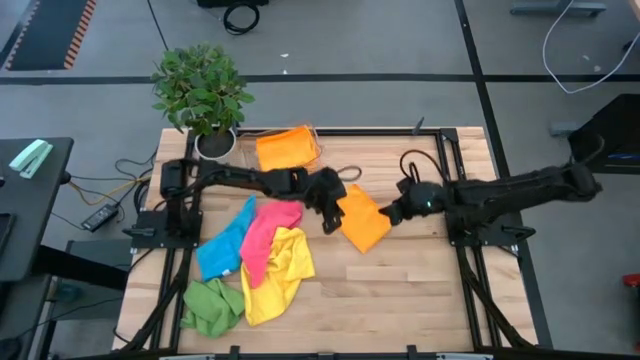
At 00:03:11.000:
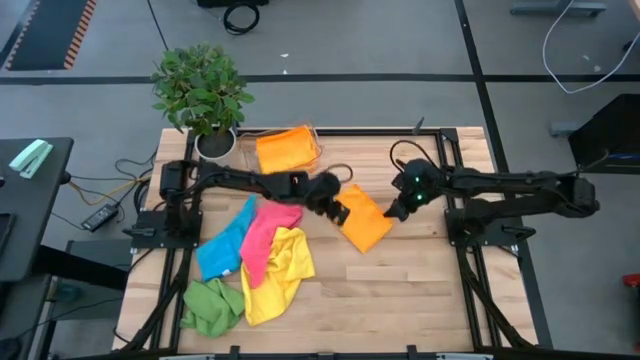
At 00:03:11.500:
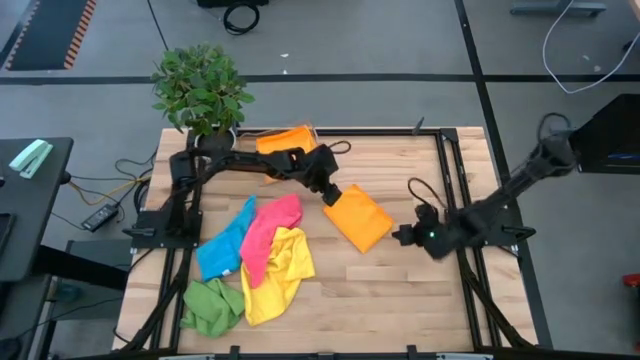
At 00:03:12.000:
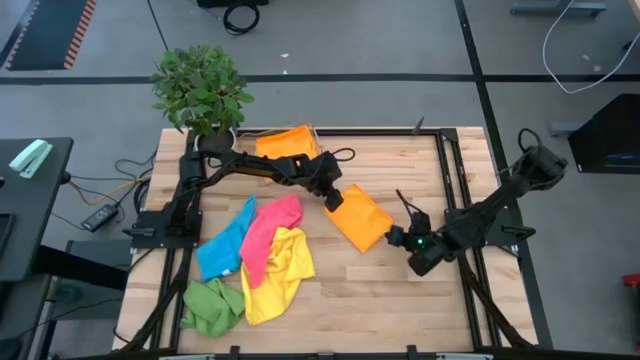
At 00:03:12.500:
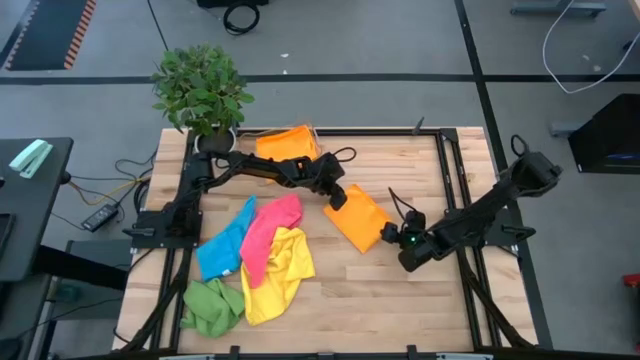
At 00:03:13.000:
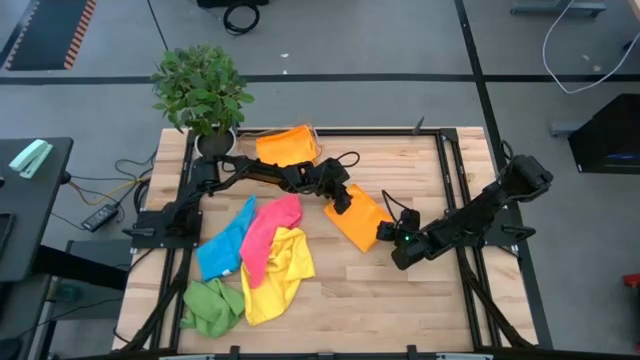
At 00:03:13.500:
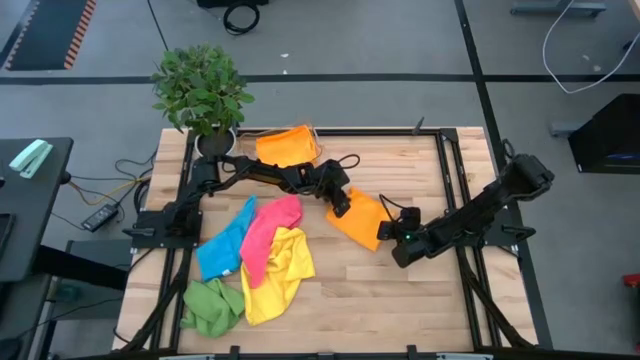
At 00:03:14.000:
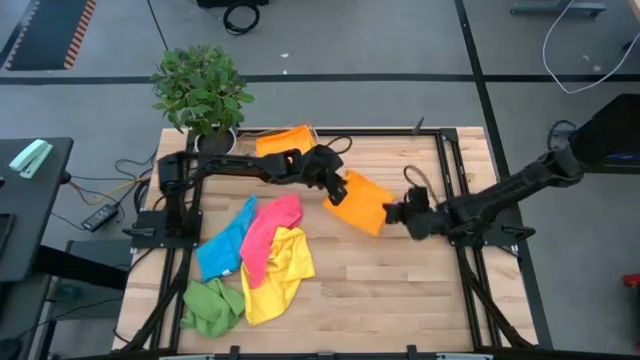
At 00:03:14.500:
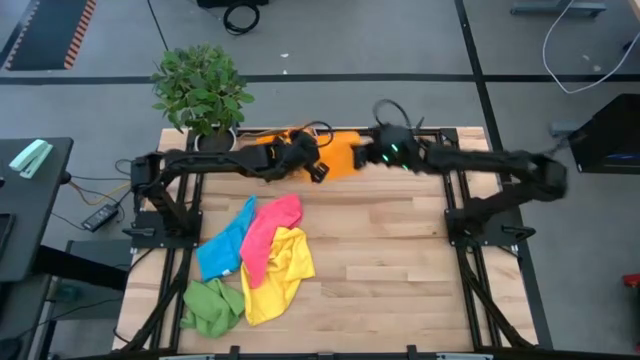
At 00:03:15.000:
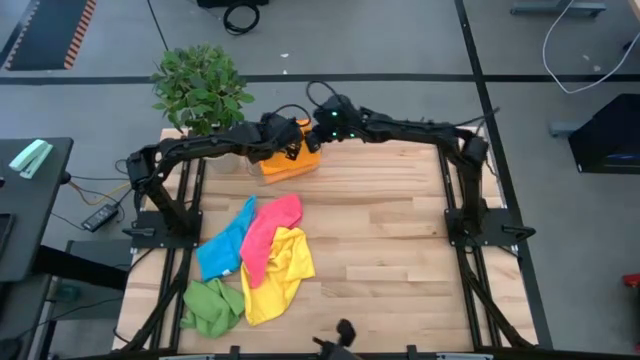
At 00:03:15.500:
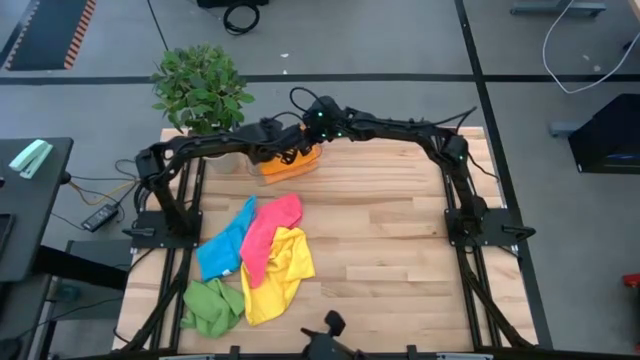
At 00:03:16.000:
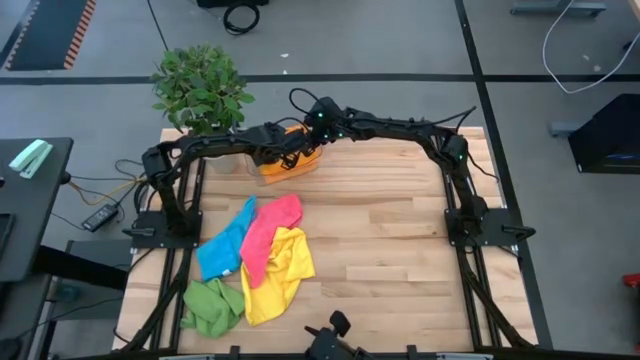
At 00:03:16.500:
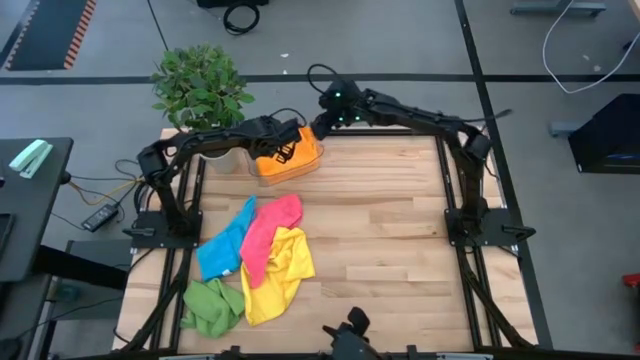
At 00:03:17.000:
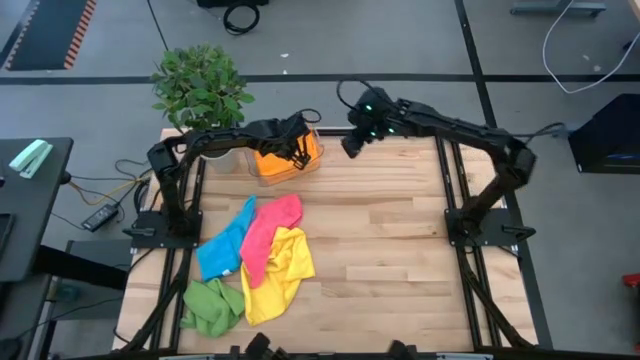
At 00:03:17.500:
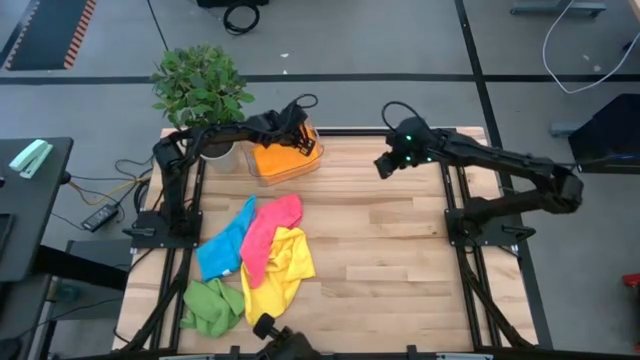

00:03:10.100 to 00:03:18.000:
Task: Fold microfiber towels
Stack the folded right orange microfiber cloth on top of the orange microfiber cloths in the transparent bin

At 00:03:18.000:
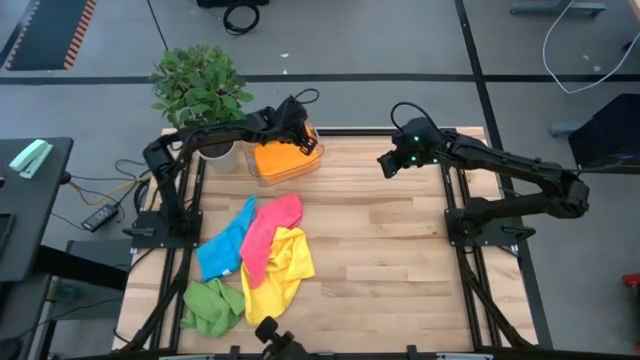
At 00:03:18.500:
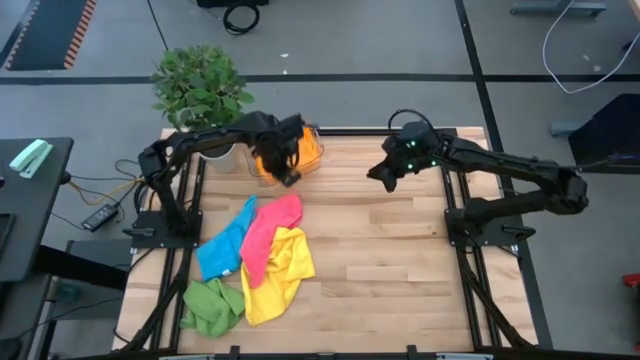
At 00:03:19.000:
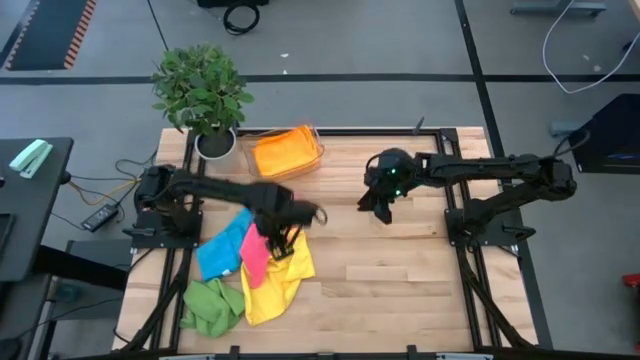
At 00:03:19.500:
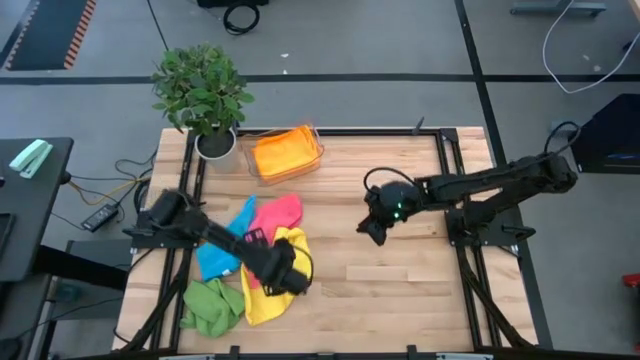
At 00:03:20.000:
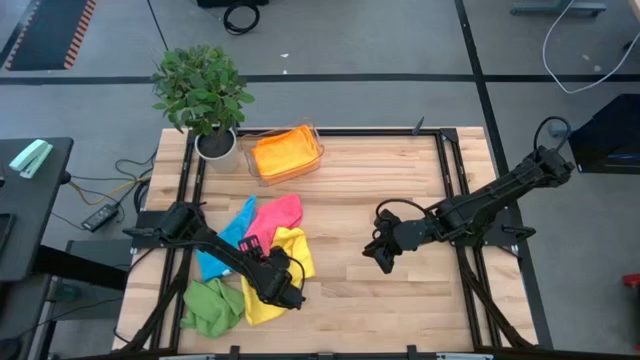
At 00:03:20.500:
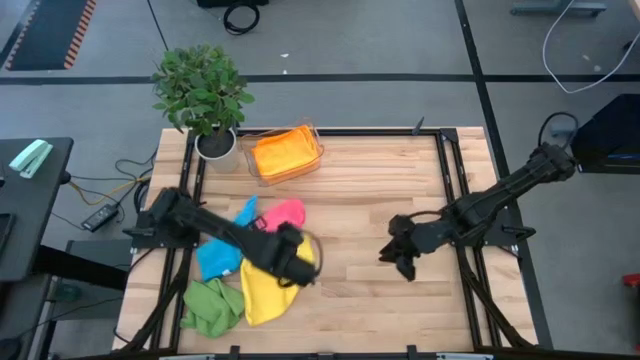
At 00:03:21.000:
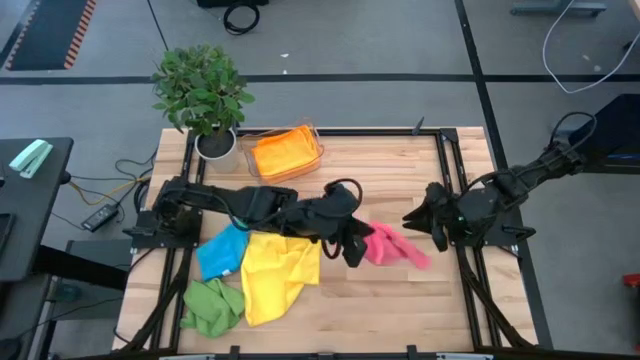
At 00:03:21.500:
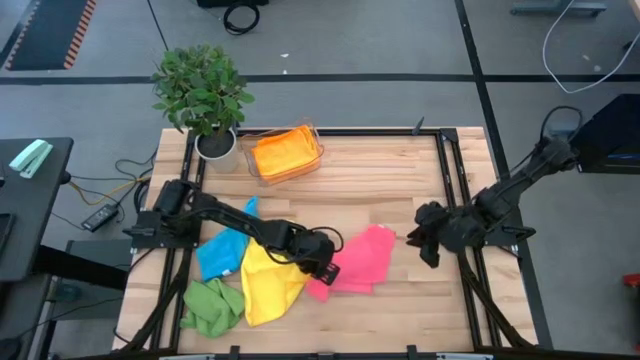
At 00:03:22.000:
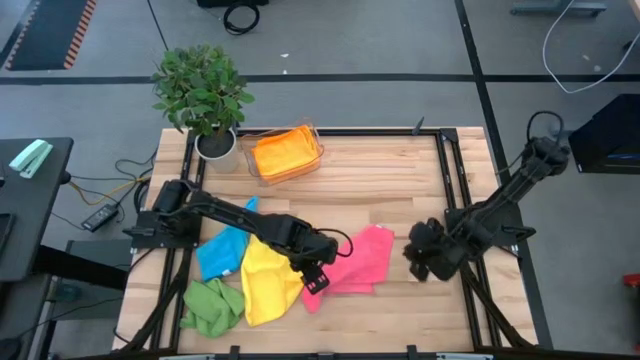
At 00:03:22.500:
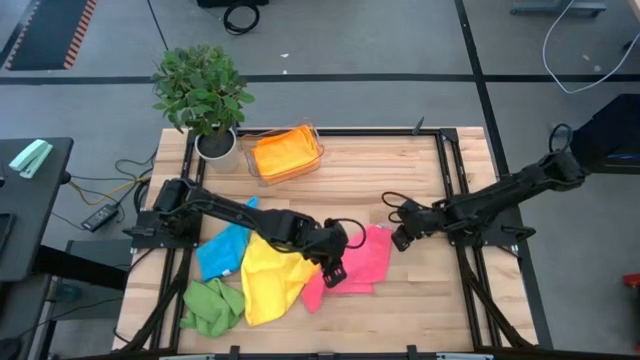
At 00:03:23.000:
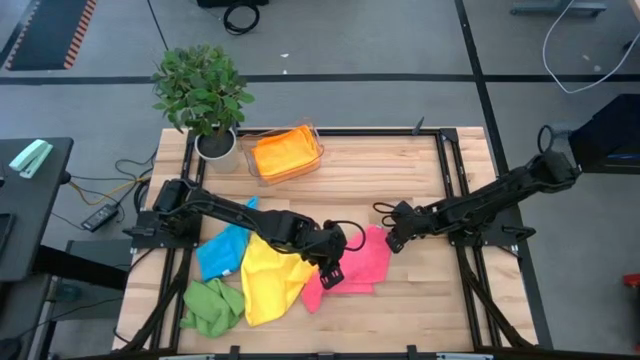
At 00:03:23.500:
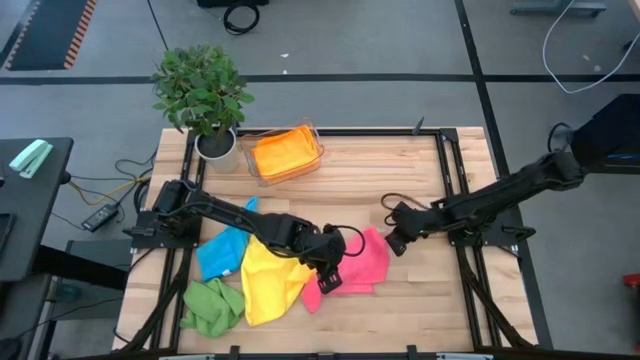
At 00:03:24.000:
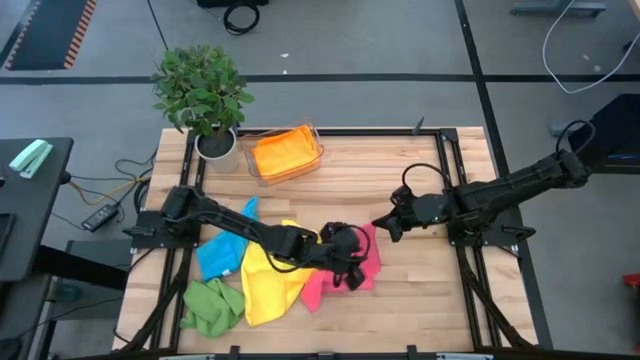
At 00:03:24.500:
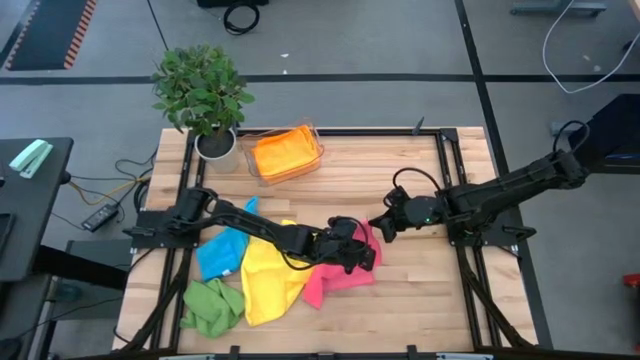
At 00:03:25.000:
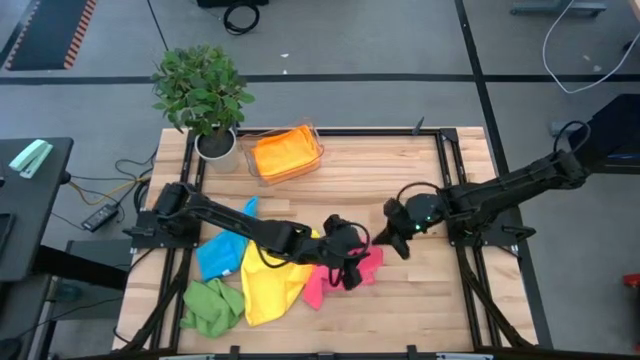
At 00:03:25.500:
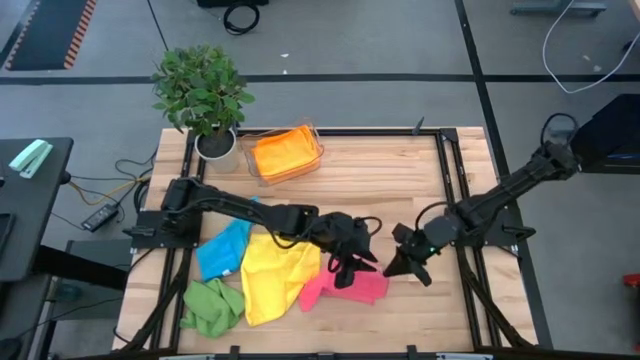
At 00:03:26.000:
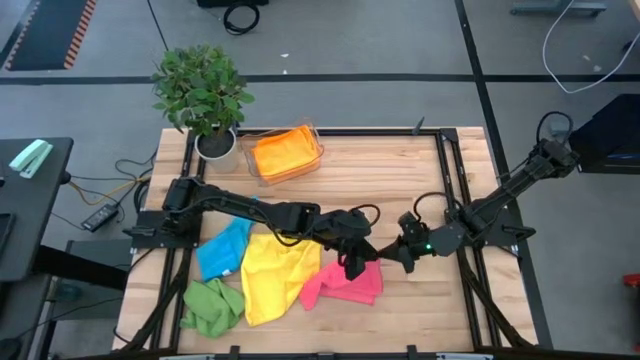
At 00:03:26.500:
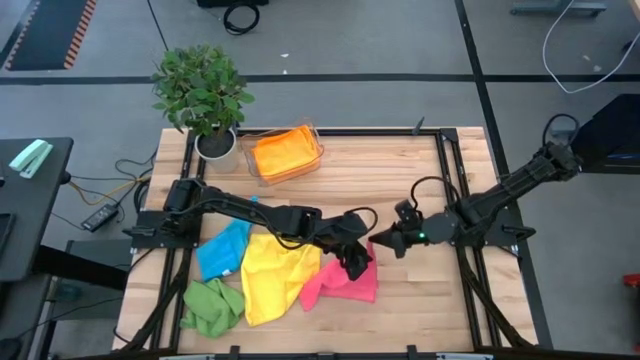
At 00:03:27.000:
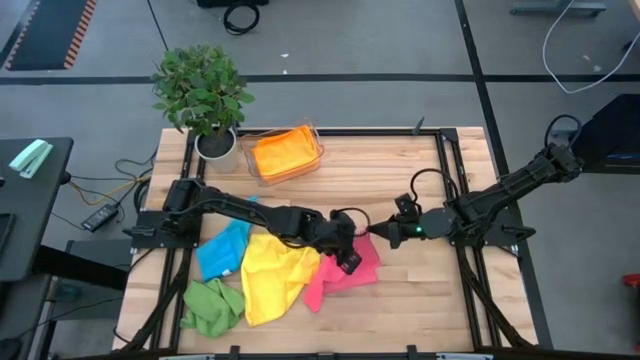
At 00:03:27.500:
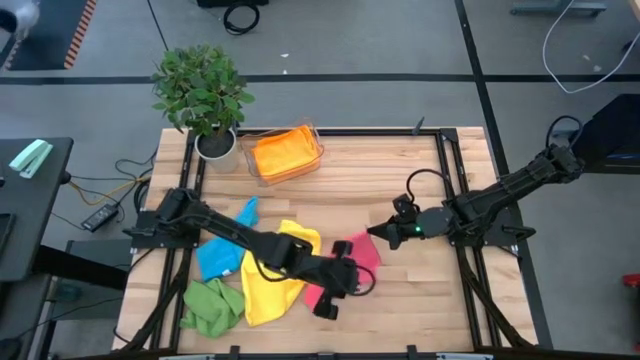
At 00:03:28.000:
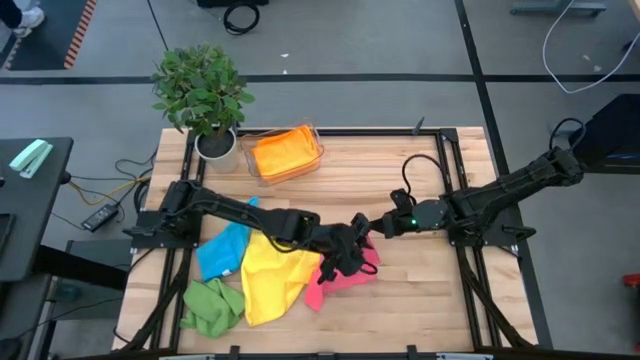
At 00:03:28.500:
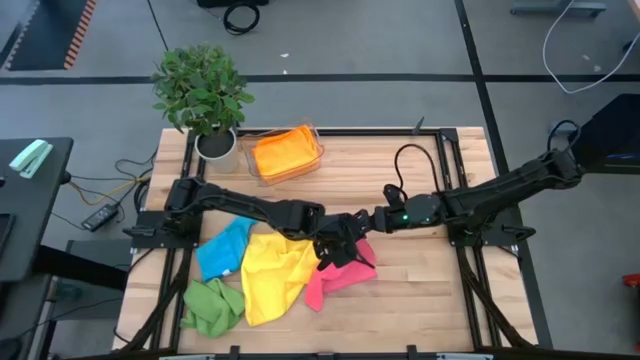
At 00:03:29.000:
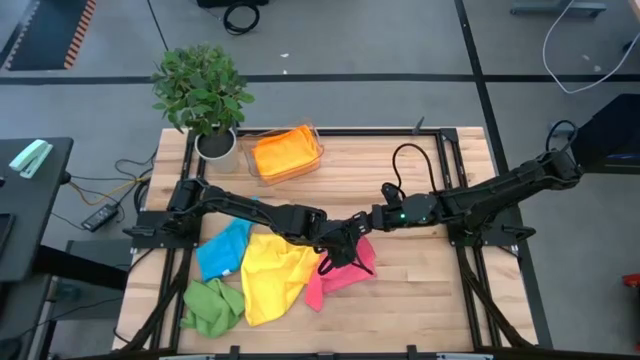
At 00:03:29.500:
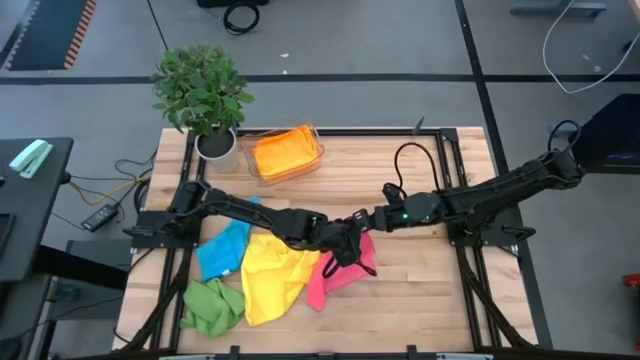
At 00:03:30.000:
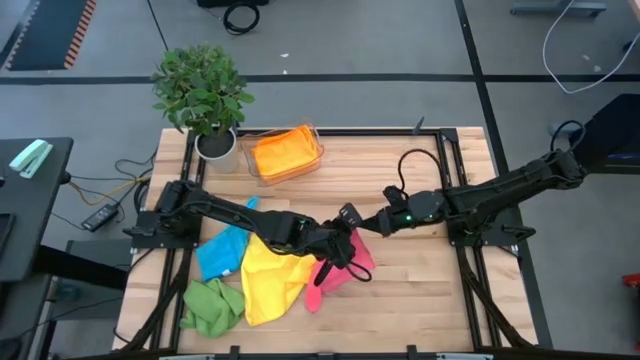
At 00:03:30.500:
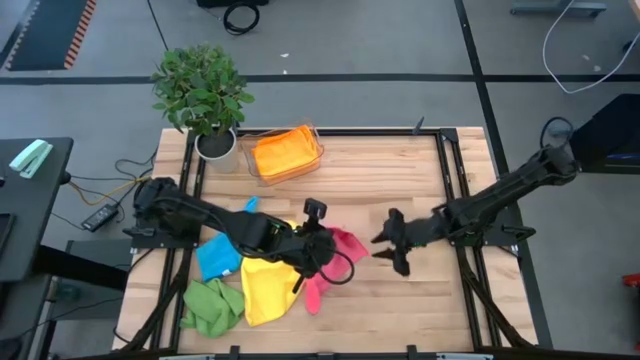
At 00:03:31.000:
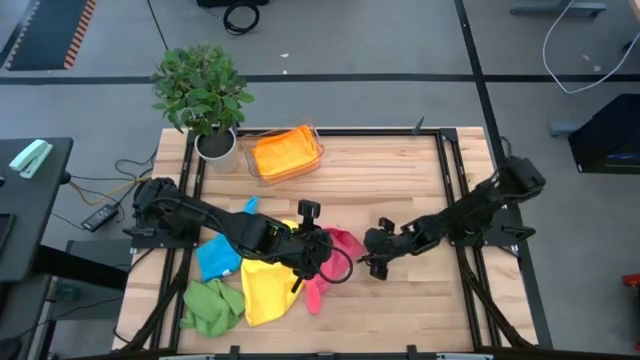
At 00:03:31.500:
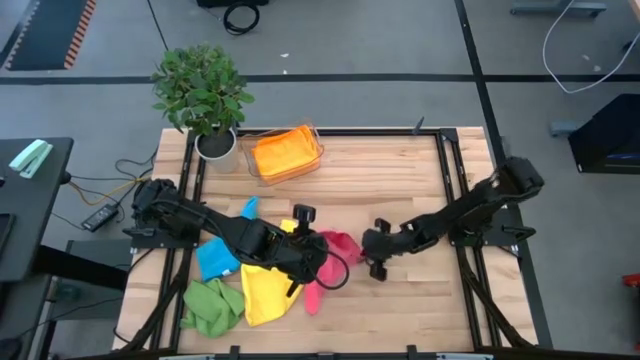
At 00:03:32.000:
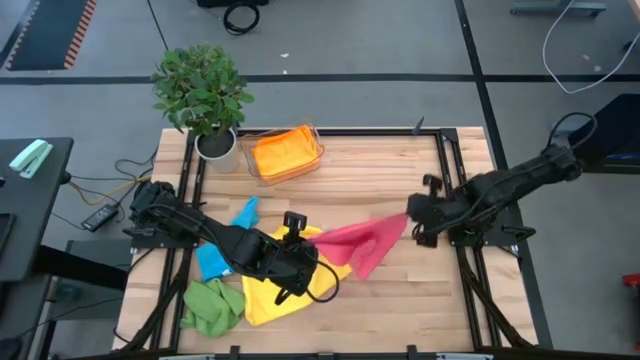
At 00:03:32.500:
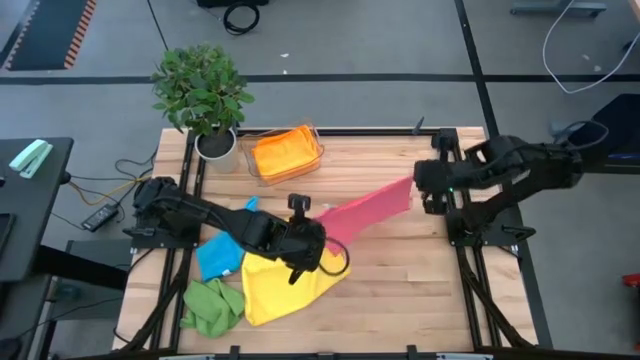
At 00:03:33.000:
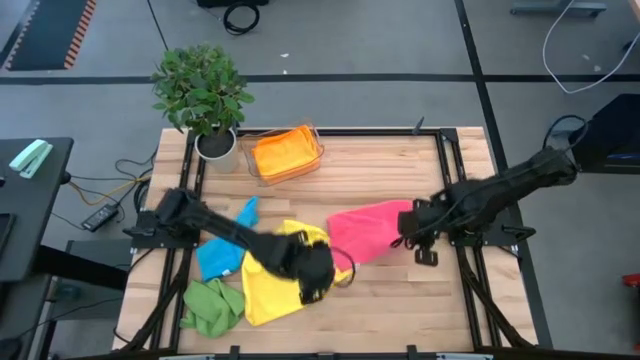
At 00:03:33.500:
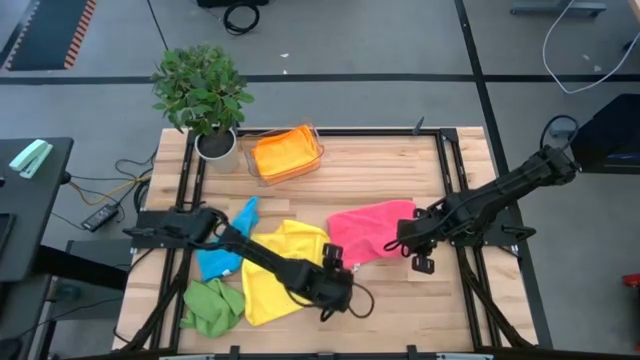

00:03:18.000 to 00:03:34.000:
Fold the pink microfiber cloth
